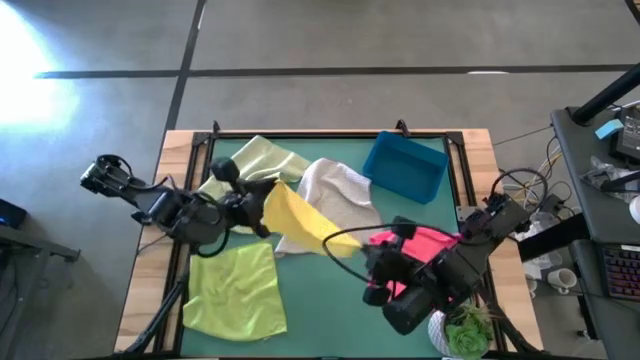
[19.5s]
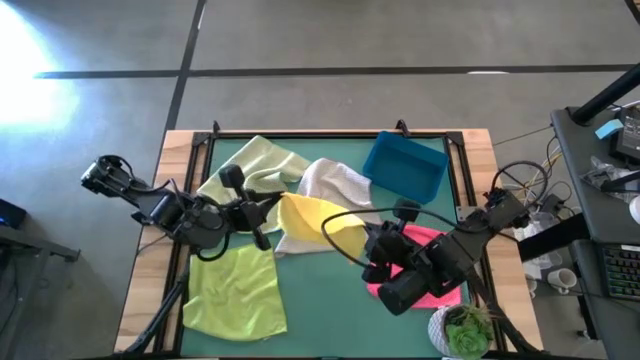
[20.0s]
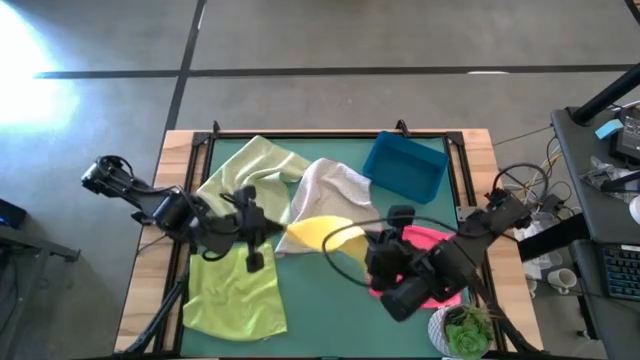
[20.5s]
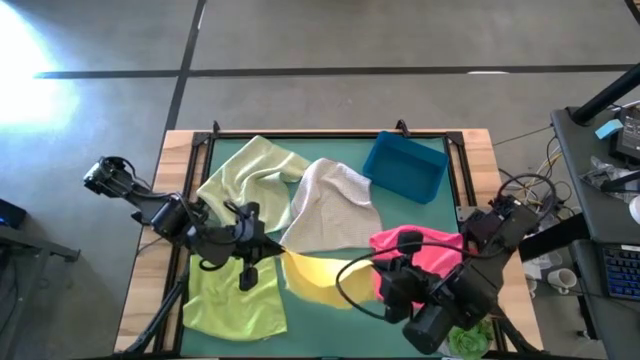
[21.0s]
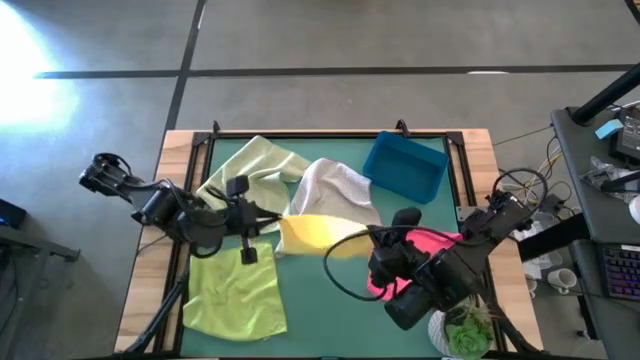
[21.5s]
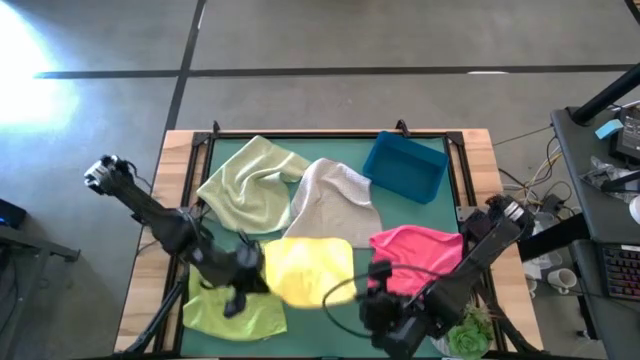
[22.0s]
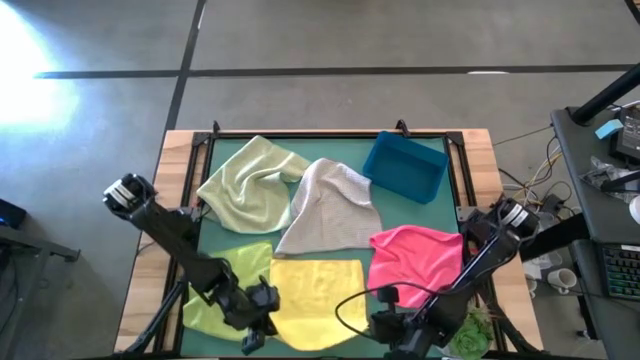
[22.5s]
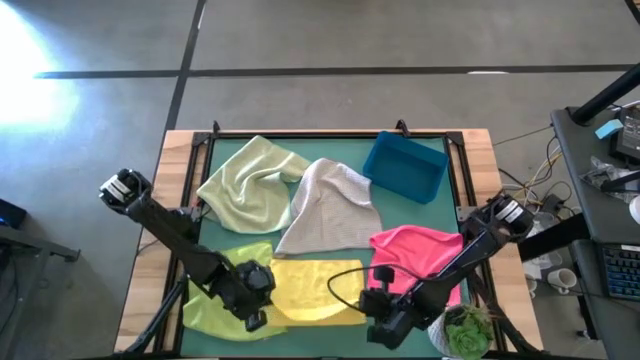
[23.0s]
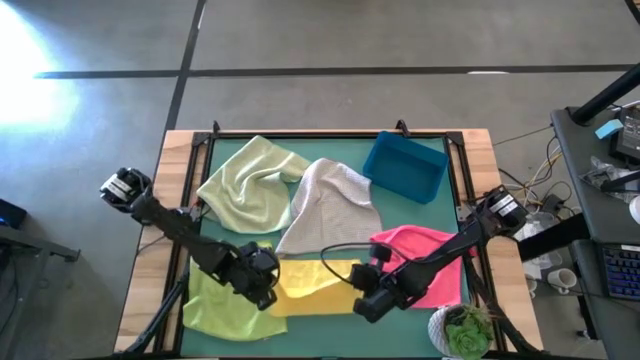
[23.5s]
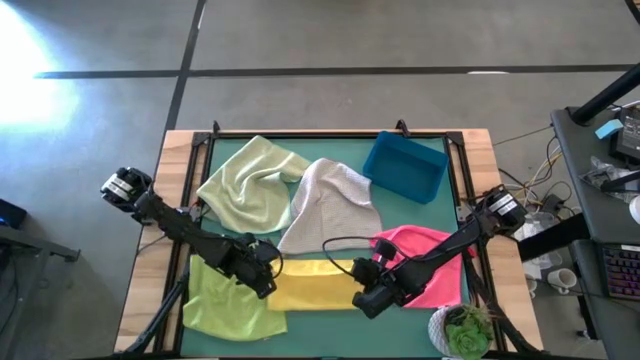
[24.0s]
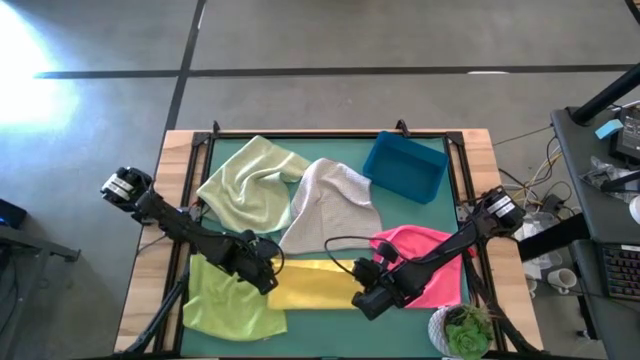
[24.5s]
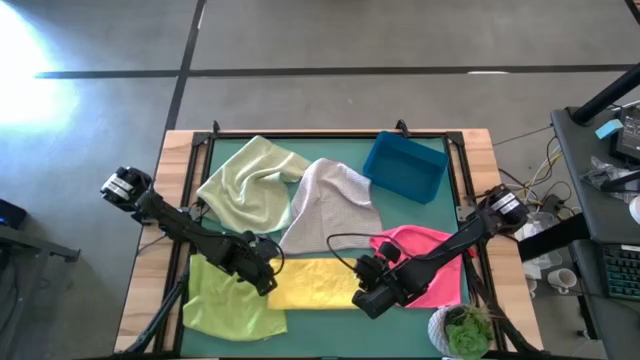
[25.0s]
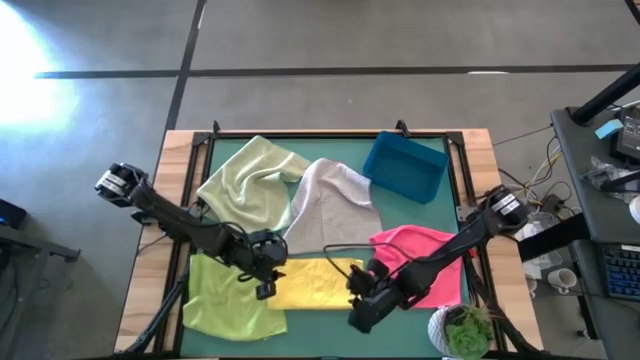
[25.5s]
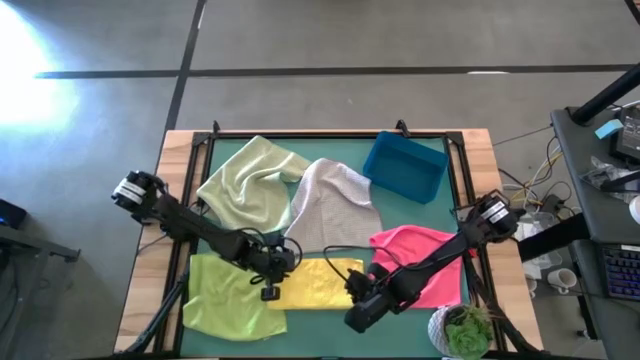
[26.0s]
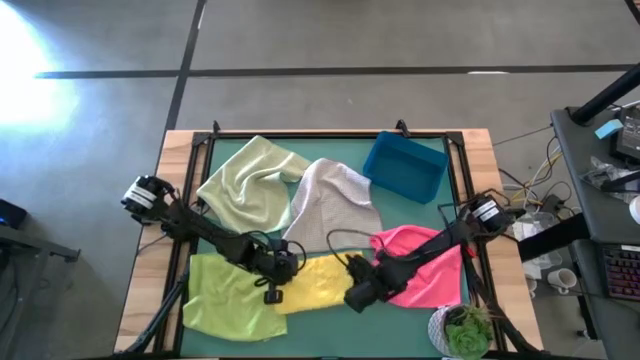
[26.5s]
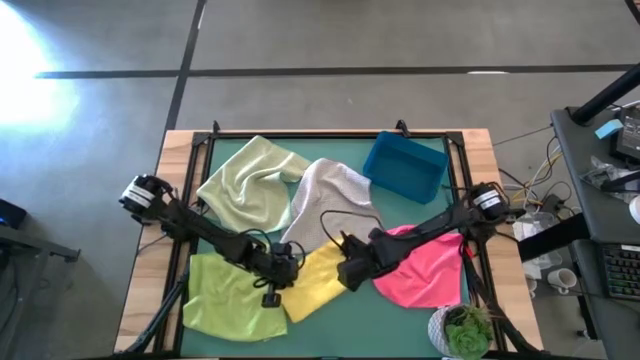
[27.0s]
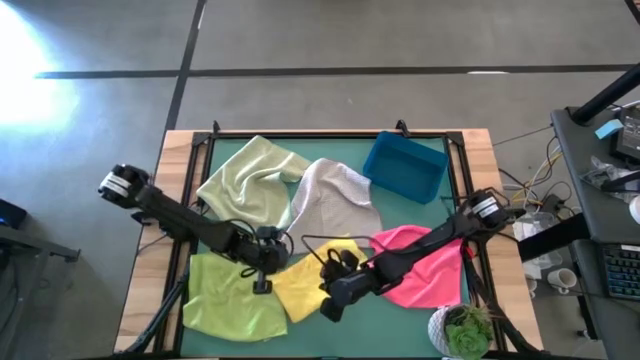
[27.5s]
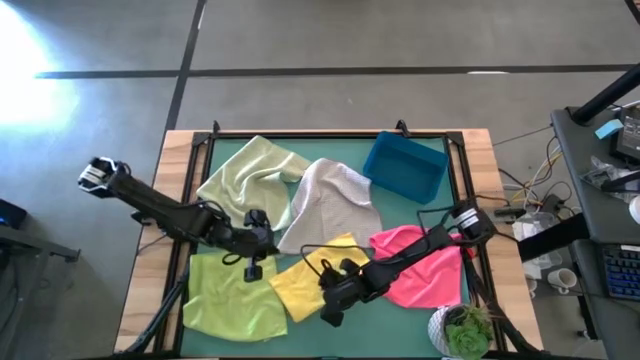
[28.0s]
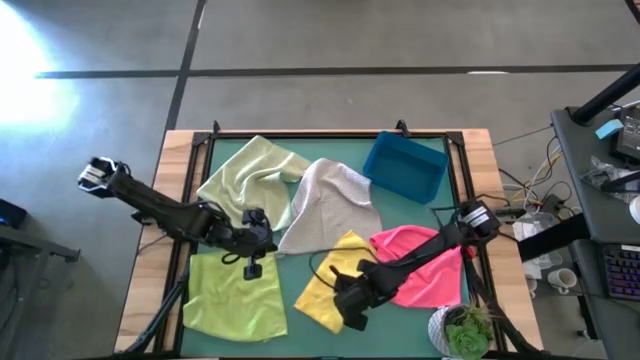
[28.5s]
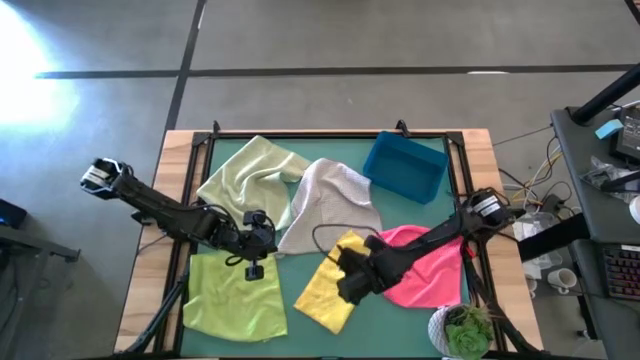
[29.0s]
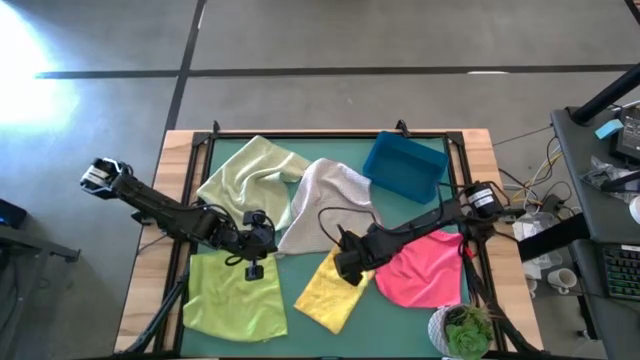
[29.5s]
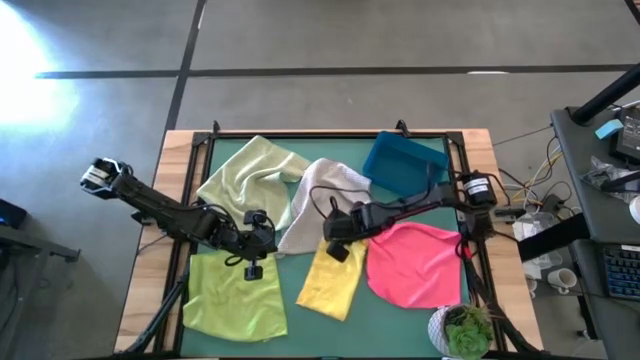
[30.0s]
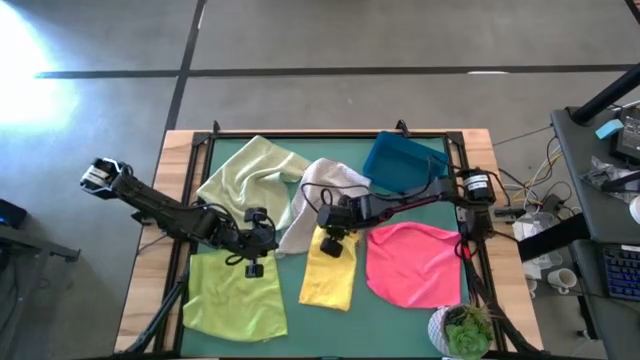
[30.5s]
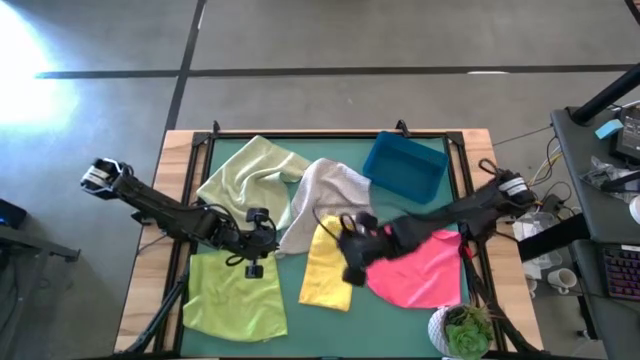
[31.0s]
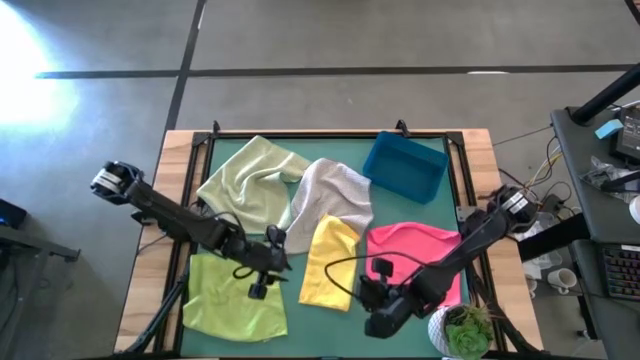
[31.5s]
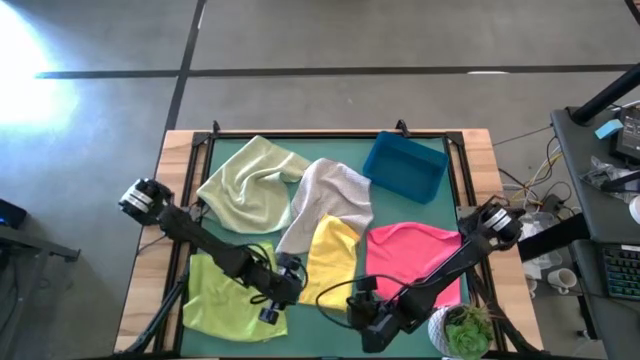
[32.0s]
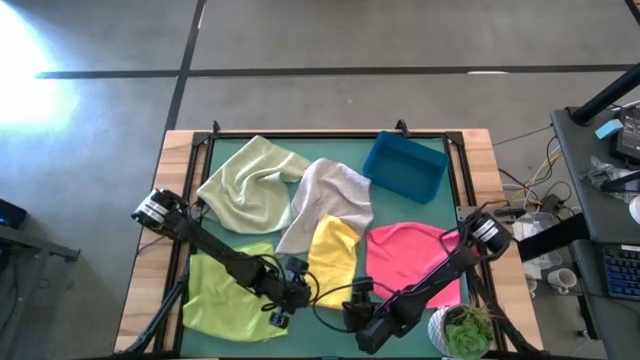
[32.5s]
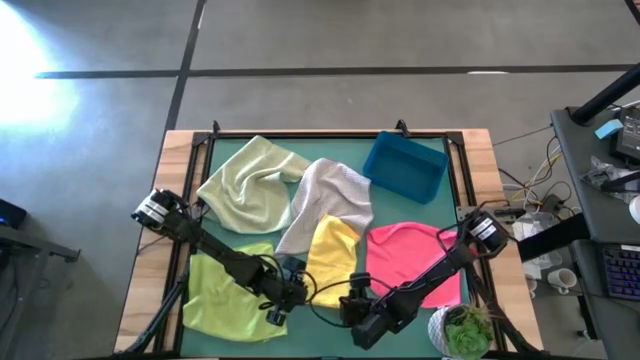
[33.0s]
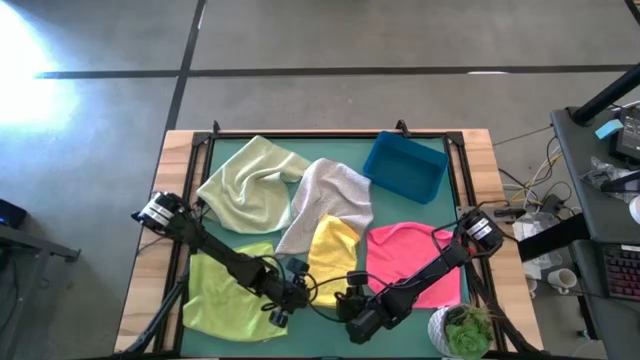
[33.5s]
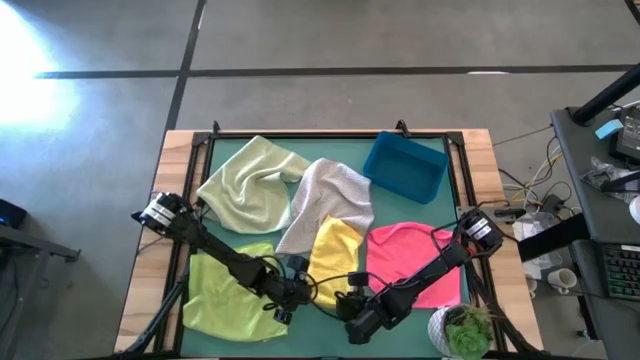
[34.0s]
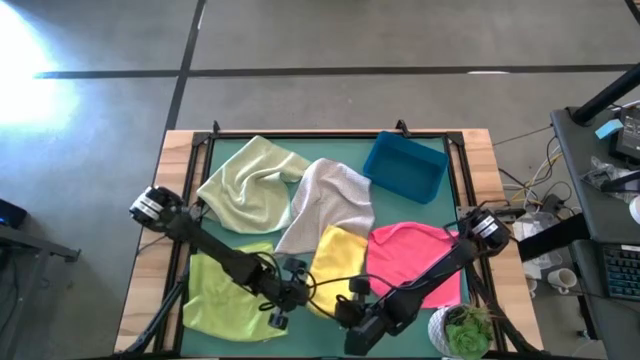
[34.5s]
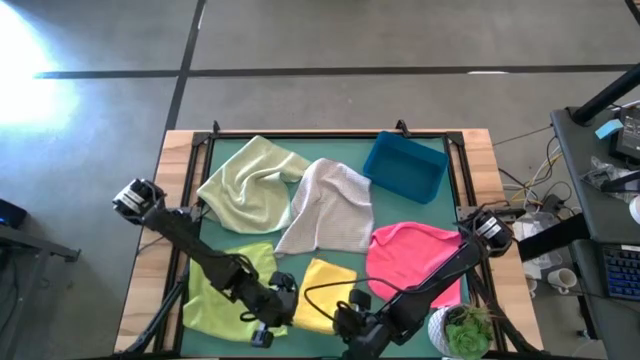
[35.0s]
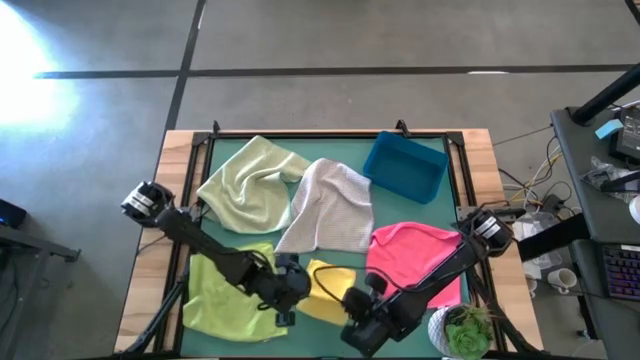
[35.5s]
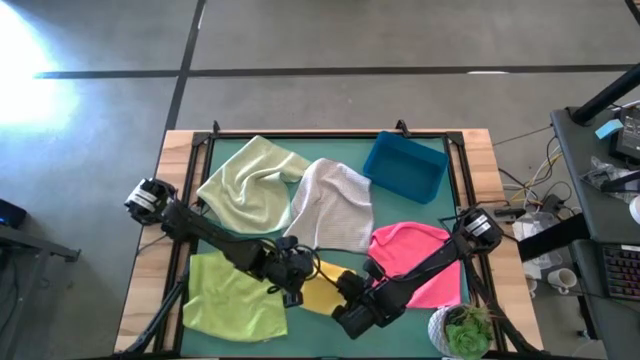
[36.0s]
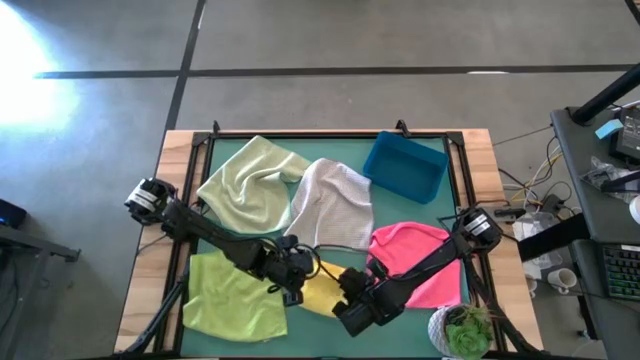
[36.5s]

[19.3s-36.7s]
Task: Fold microfiber towels
Fold the yellow microfiber cloth

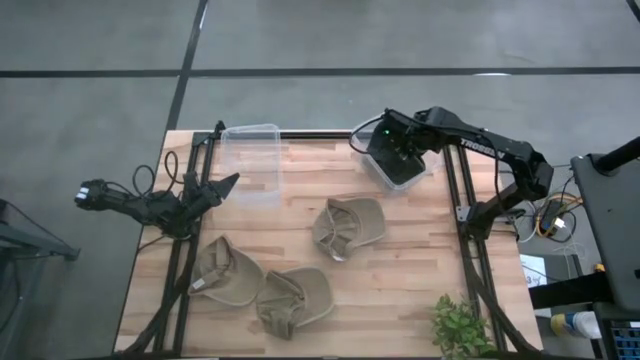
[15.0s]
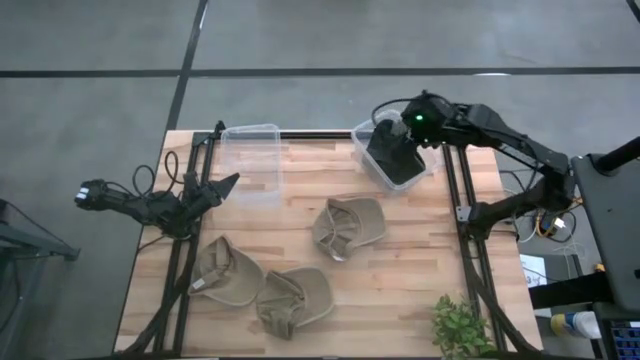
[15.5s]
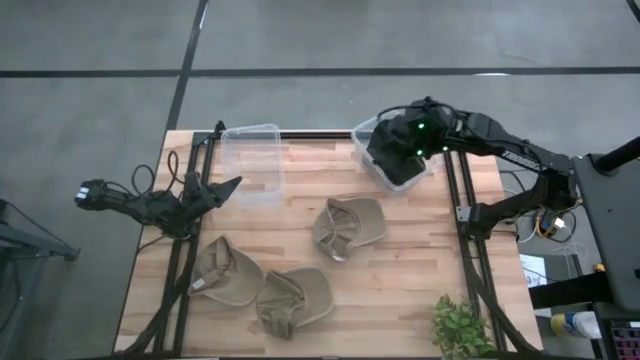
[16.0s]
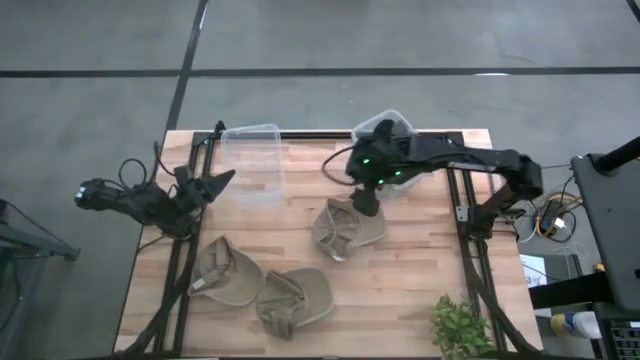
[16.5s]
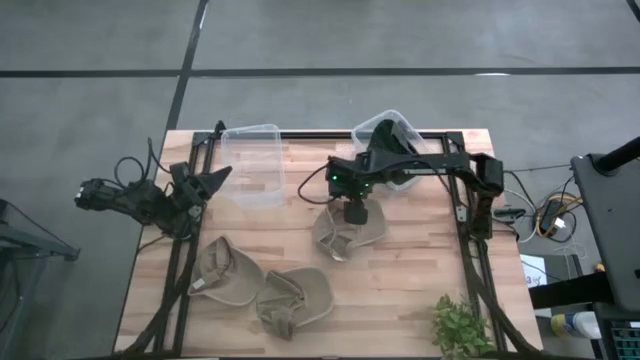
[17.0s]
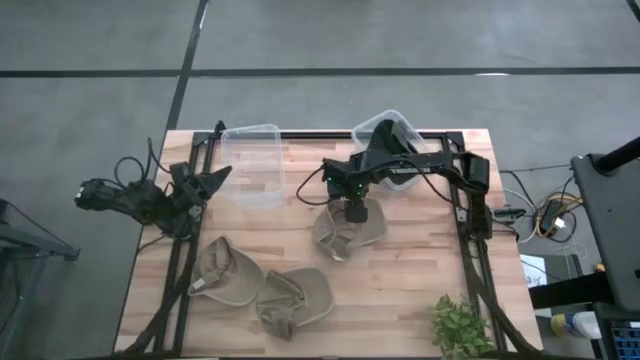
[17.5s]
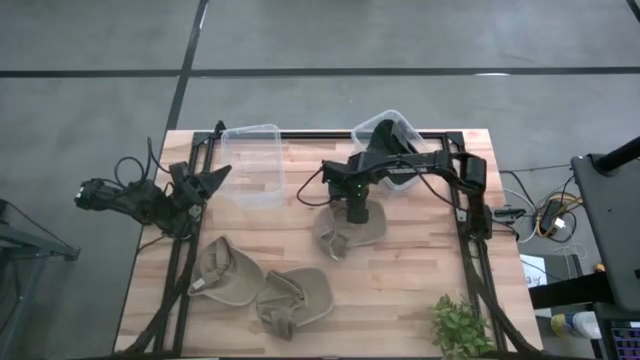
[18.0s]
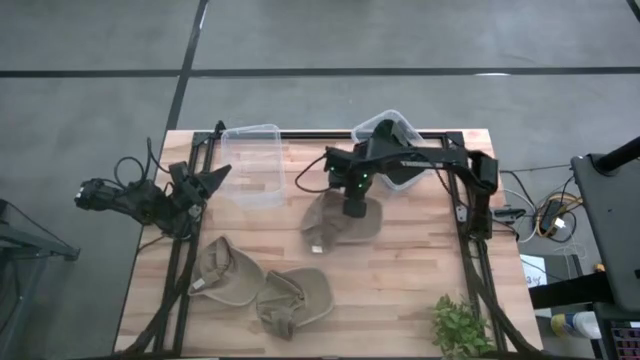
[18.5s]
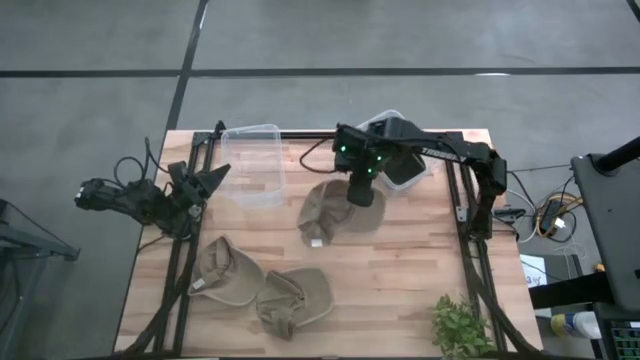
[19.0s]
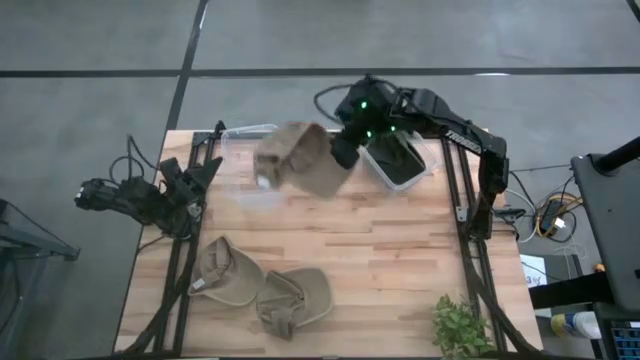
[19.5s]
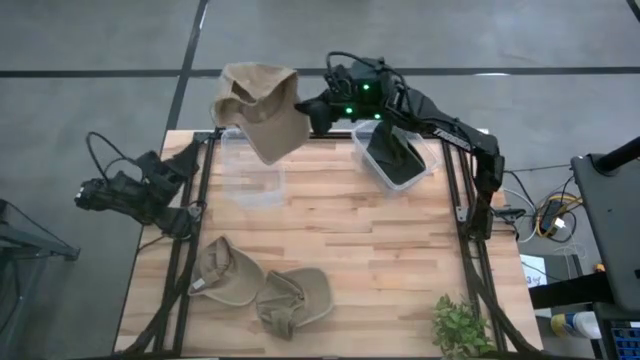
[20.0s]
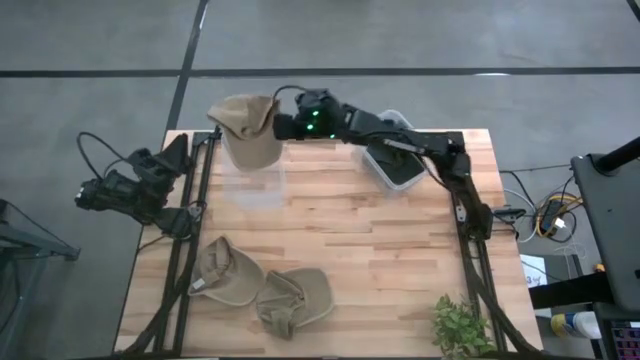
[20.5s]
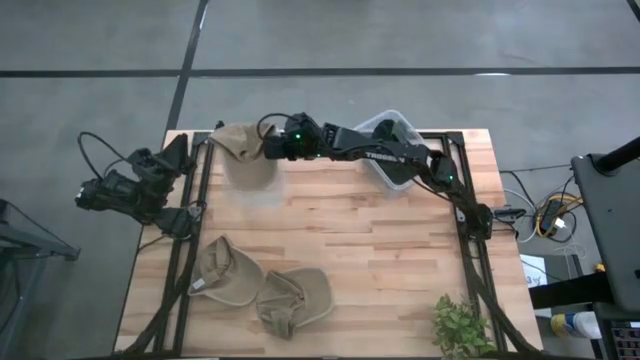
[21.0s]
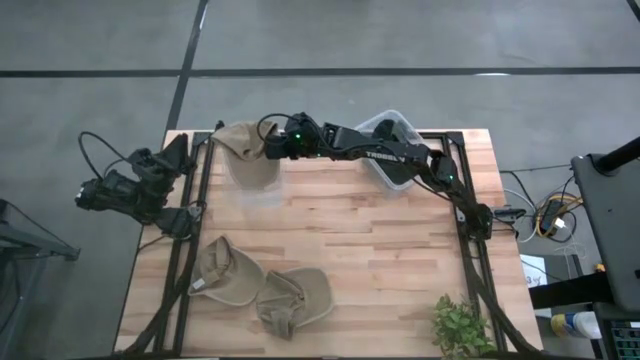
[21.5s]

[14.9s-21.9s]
Task: Pick & Place hat
Put the right brown cap into the left transparent bin
